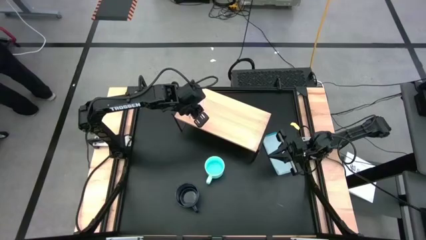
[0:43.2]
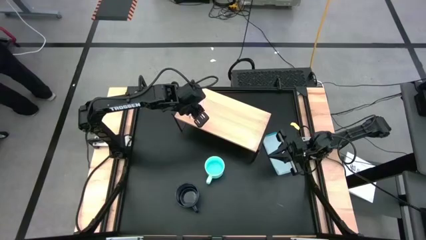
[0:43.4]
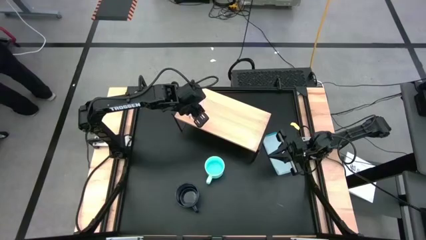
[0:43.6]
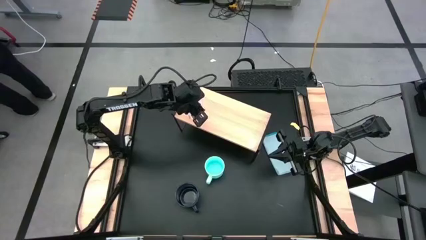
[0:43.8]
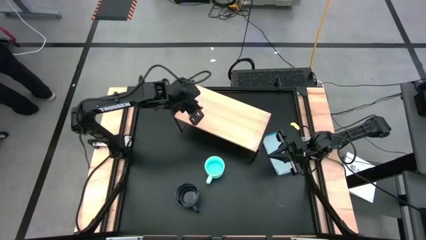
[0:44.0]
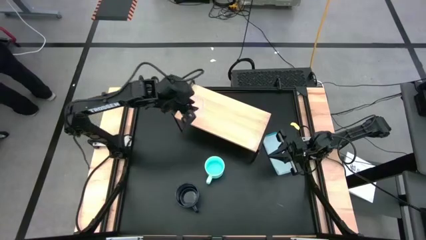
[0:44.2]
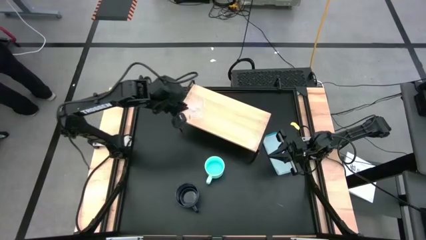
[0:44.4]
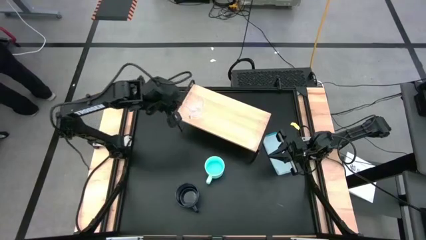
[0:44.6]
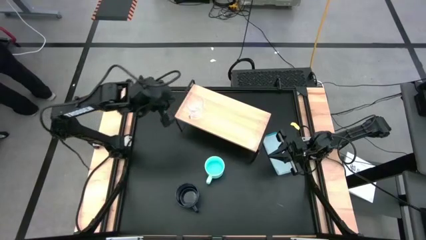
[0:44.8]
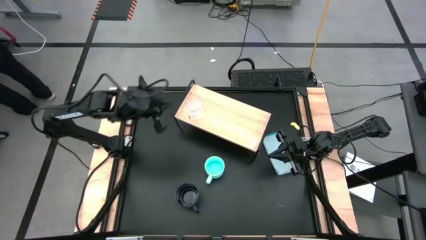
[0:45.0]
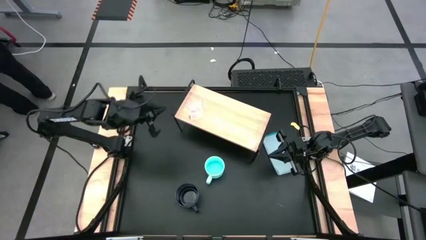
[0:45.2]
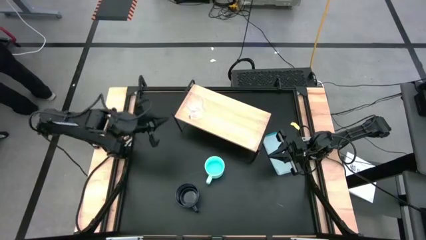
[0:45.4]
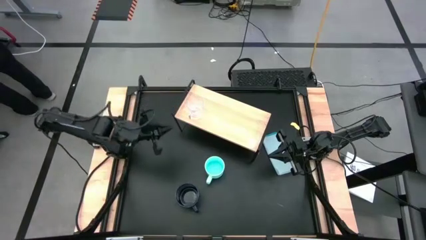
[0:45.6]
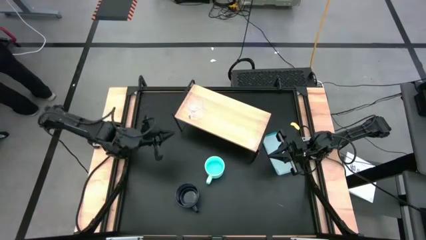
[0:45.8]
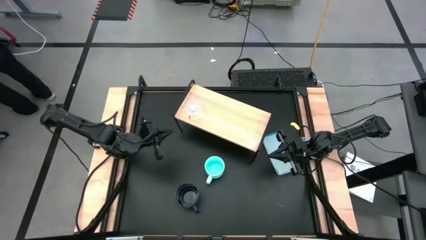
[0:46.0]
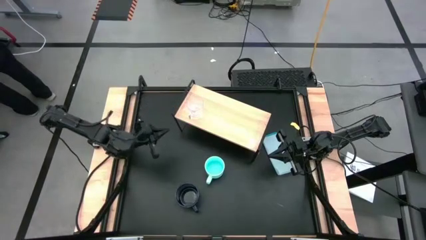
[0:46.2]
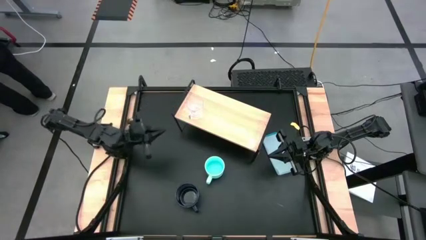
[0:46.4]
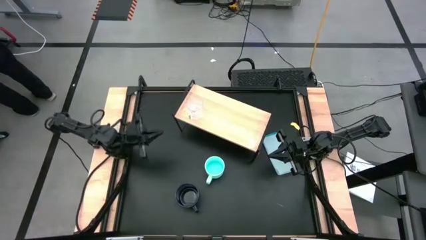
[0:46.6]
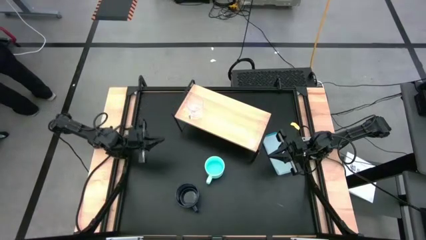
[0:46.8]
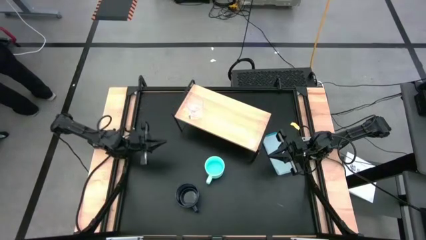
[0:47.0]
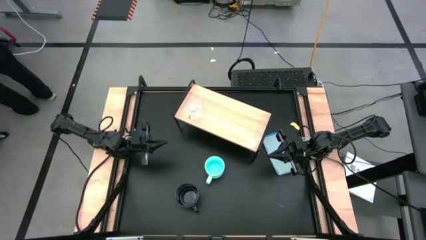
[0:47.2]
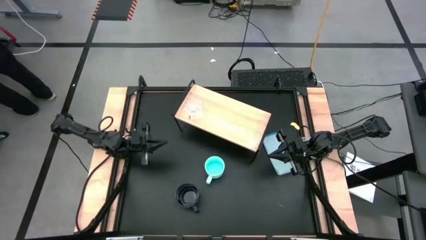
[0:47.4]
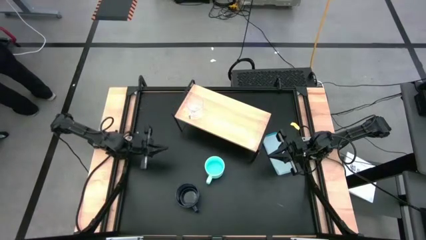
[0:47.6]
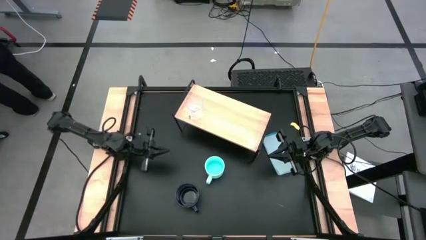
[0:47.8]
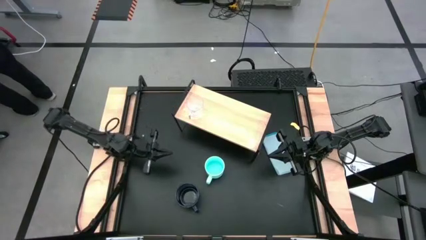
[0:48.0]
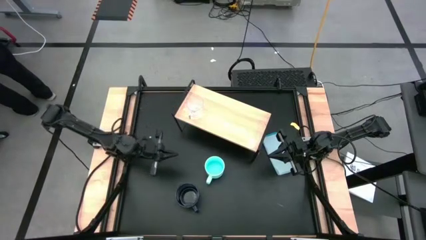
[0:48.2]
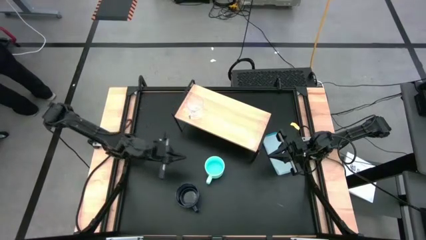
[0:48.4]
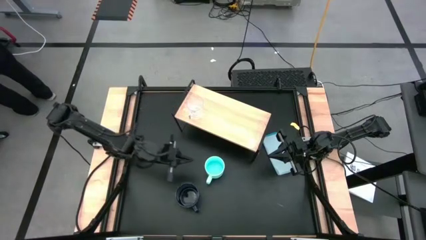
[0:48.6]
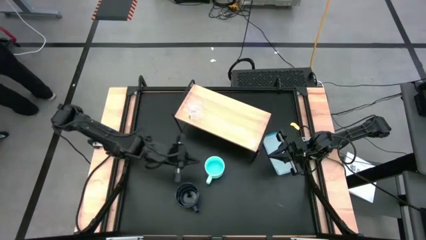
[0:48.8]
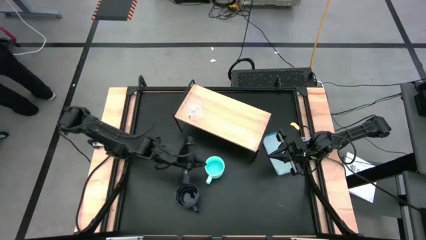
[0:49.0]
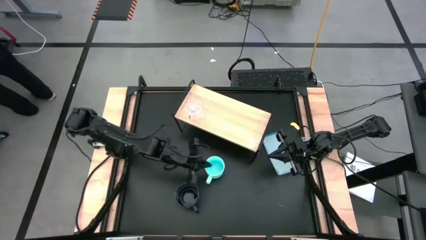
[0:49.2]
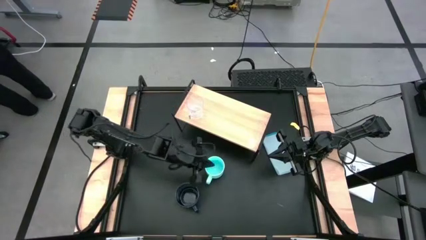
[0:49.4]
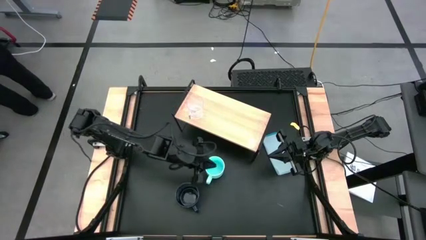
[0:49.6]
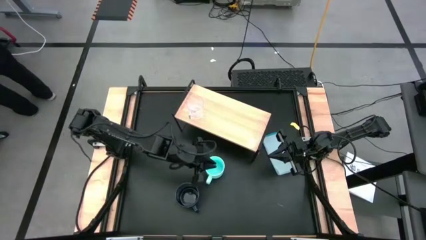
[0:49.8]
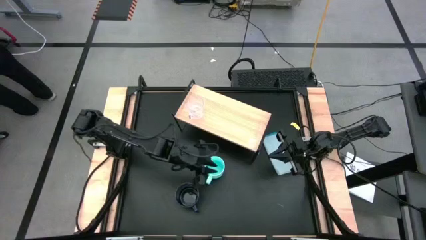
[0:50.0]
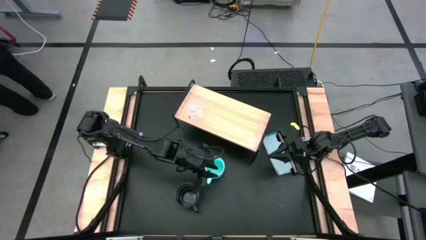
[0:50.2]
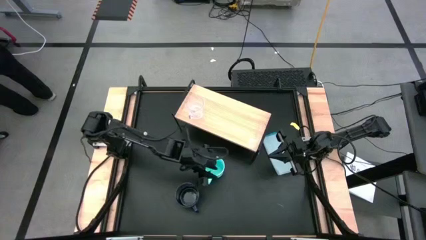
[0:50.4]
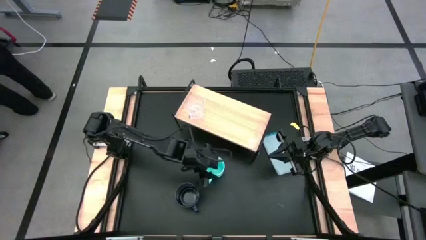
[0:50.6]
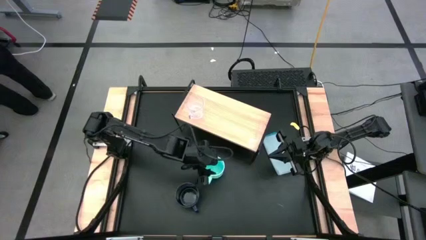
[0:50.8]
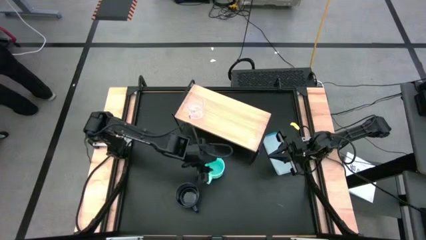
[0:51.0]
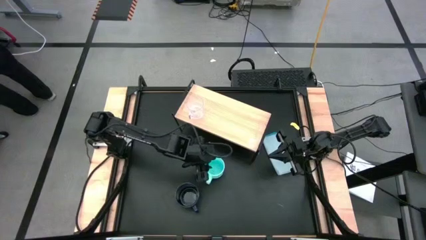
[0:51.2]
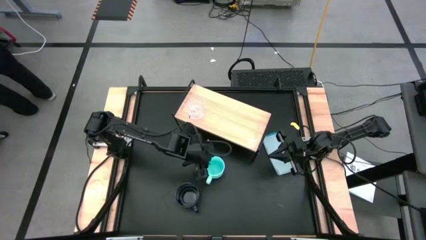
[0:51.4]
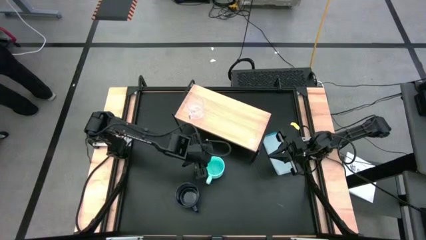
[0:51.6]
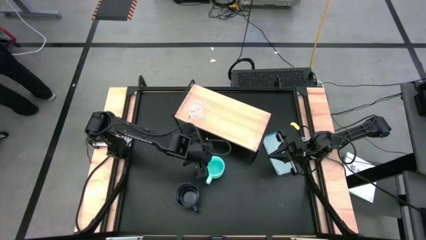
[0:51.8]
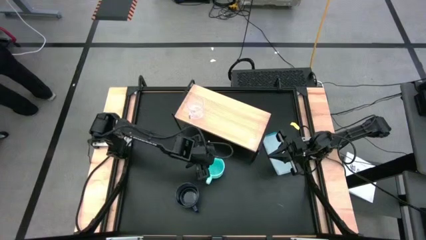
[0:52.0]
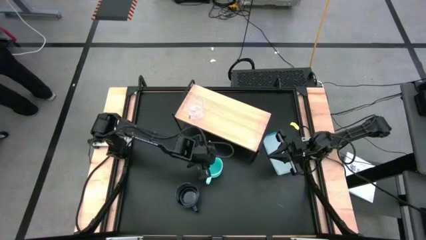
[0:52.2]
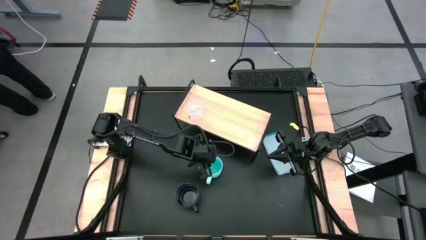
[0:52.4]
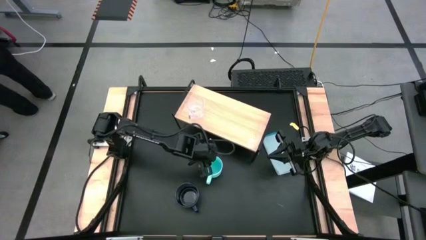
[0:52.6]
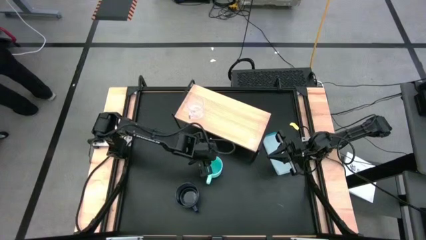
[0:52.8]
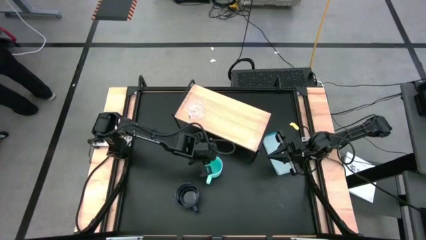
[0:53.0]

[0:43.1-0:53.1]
Task: Stack small to large cups/mugs on shelf
Put the light blue mug on the shelf

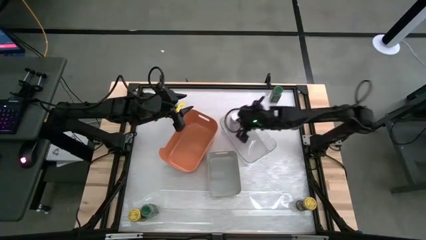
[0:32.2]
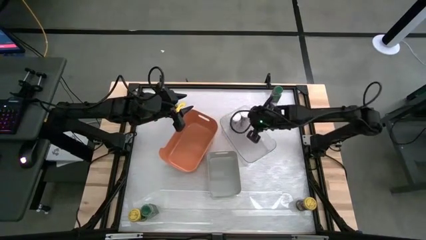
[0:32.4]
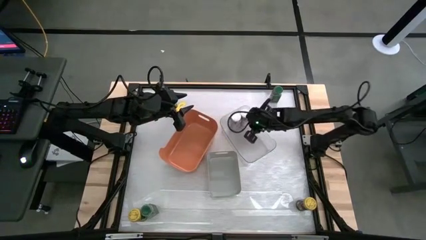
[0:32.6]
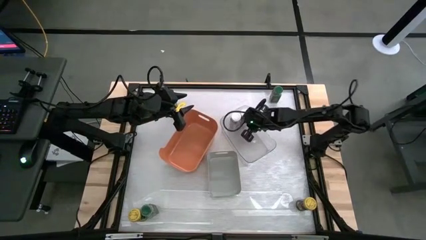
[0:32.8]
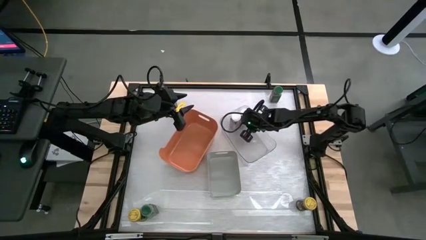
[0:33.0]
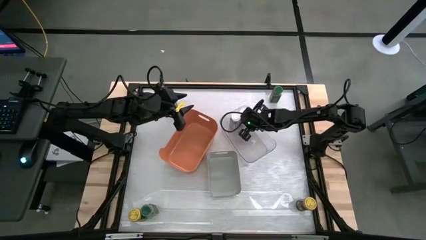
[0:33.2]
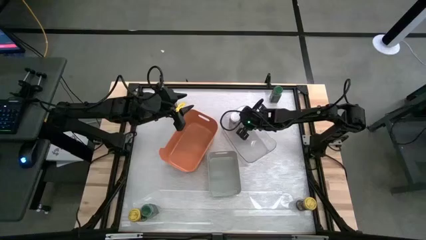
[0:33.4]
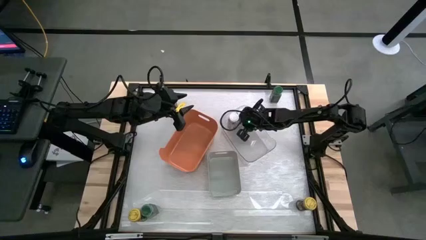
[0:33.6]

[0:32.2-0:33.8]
Task: Sort spices by type
Adjust the white seasoning bottle in the transparent bin

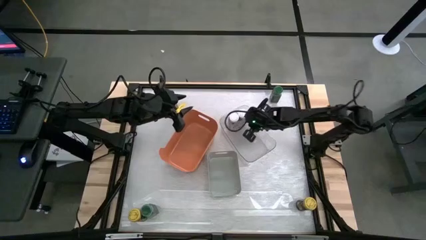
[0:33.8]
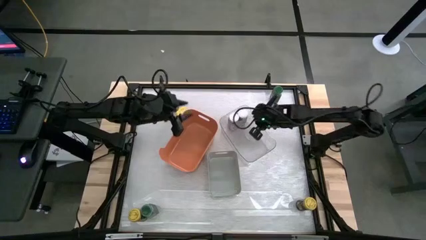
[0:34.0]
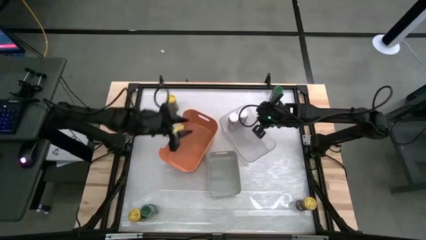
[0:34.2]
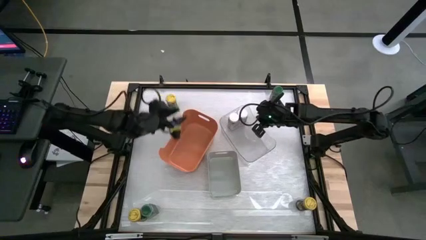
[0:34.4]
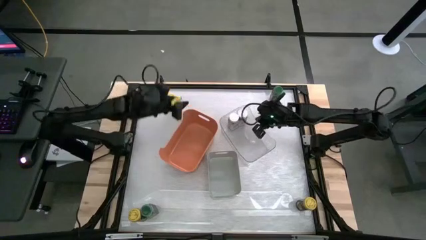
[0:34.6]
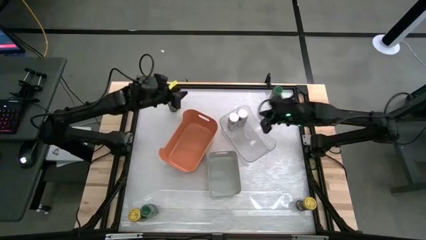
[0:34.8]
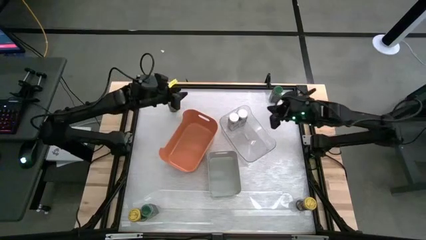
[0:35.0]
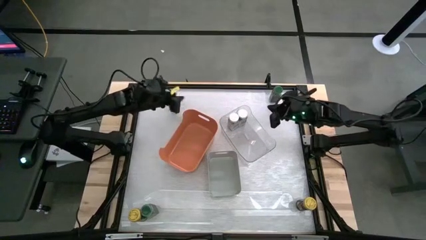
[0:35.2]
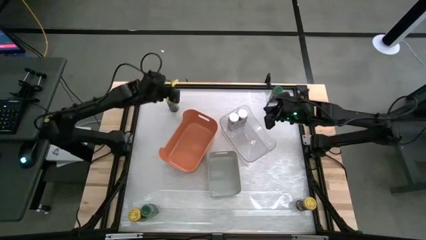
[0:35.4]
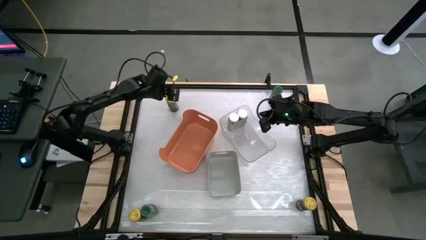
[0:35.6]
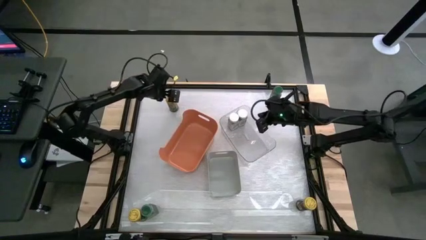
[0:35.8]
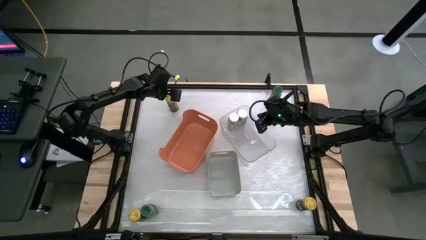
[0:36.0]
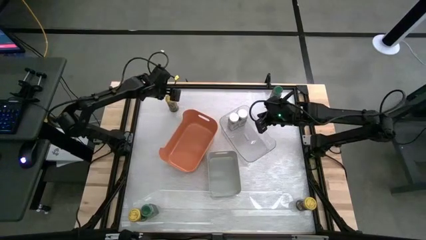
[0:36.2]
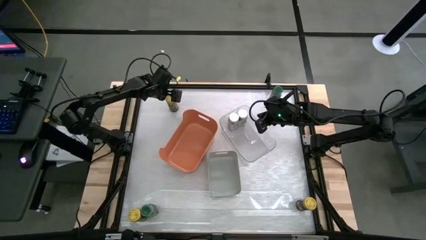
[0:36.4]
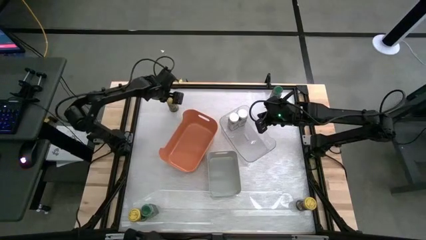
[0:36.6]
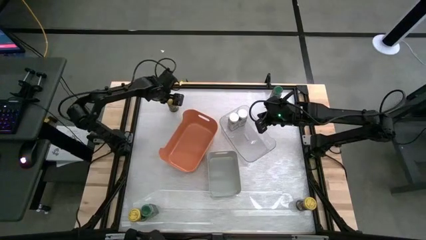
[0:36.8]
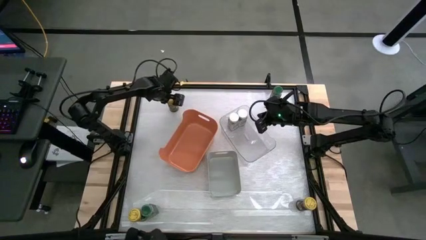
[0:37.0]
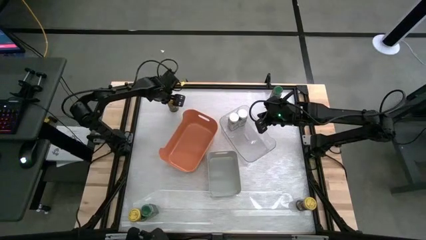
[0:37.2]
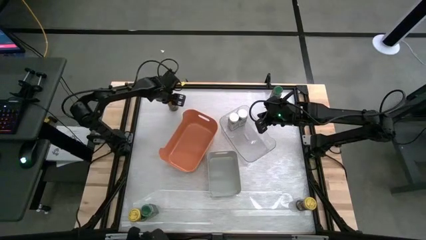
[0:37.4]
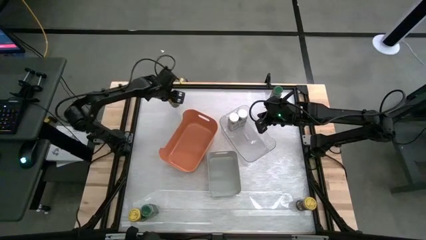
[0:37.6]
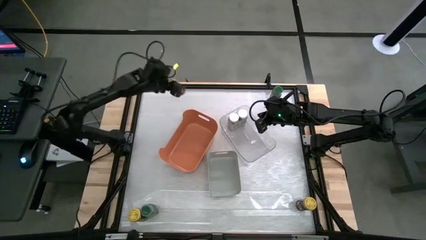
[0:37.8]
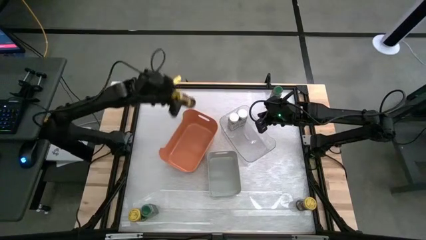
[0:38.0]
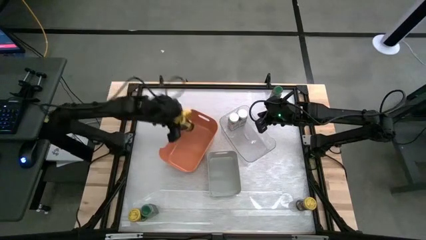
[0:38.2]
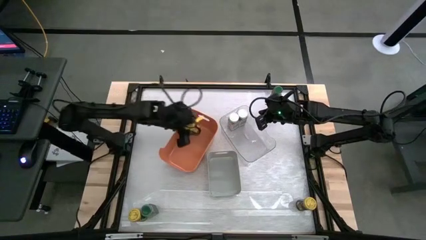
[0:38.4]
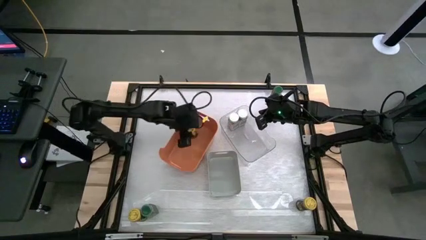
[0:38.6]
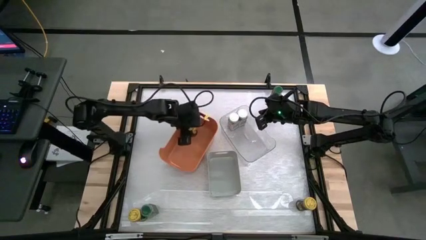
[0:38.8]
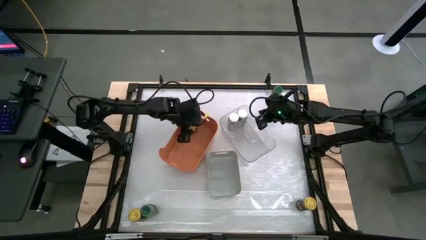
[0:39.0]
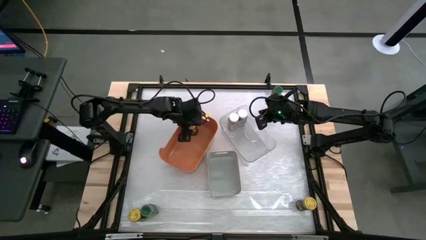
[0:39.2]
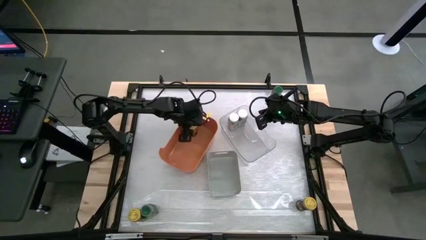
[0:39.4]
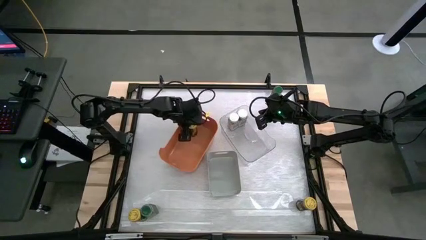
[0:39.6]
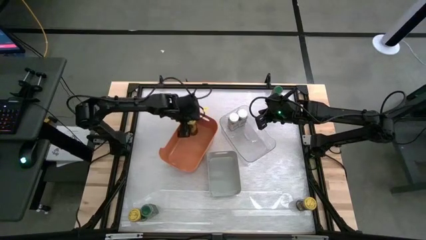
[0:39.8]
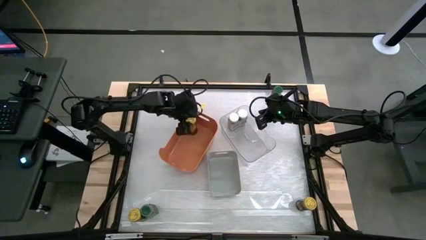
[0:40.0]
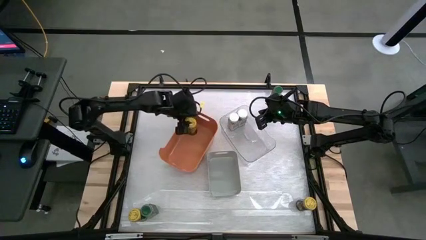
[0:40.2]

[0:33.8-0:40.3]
Put the top left yellow seasoning bottle into the orange bin
